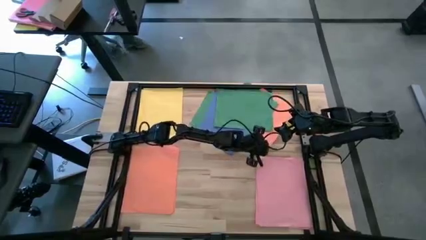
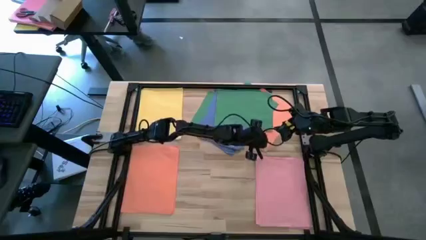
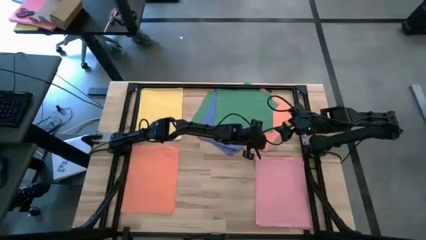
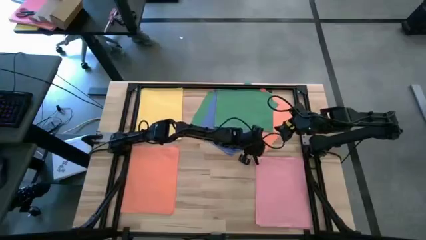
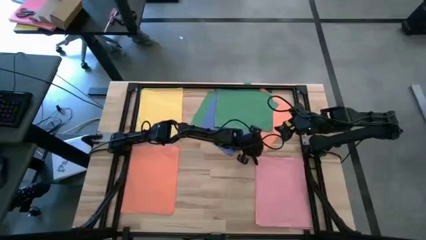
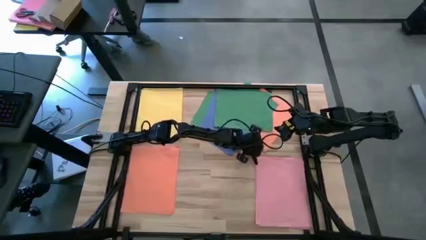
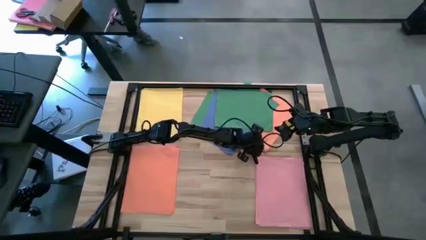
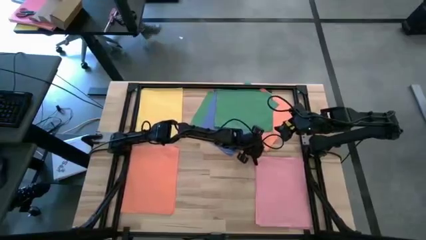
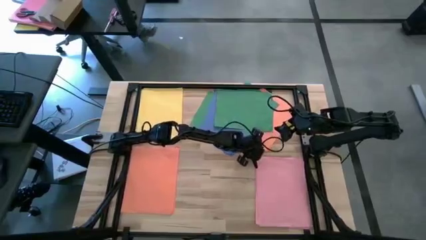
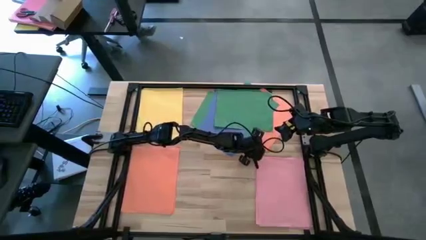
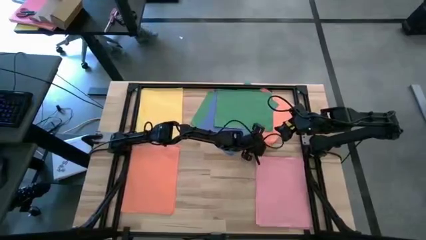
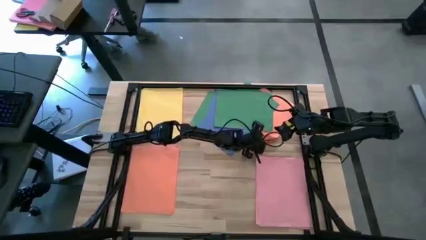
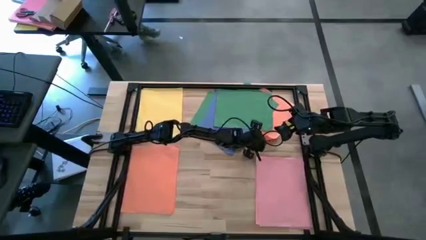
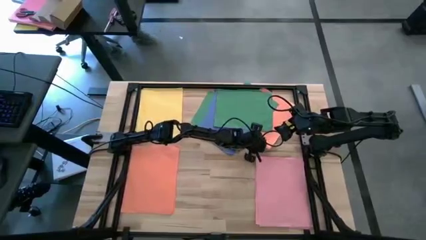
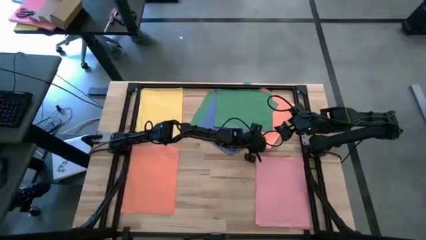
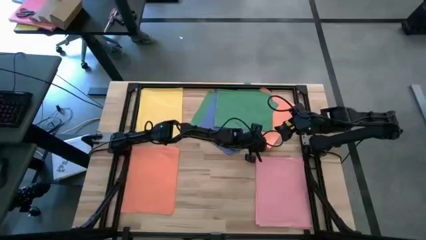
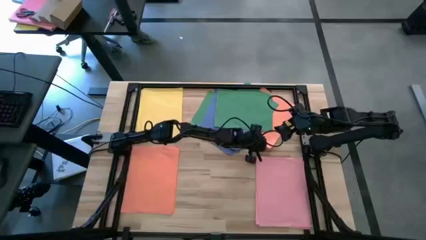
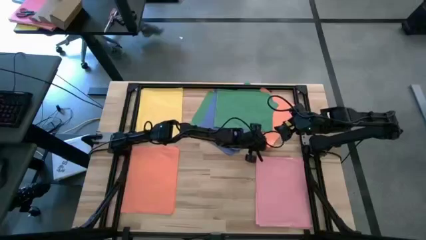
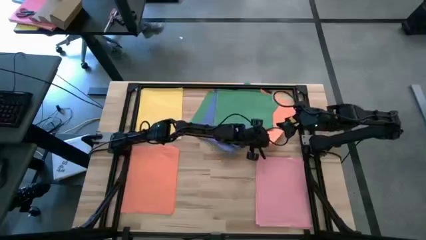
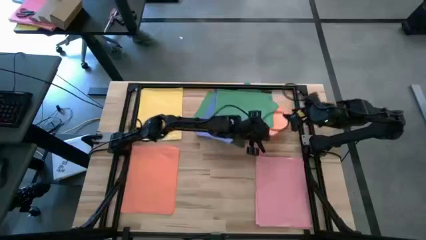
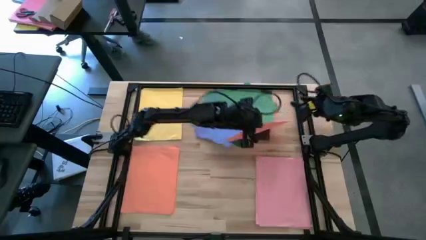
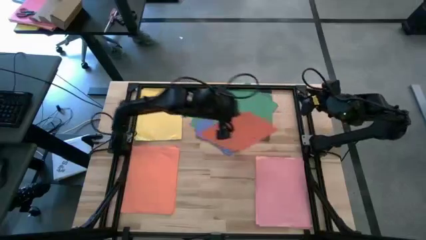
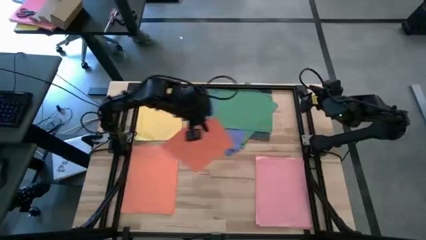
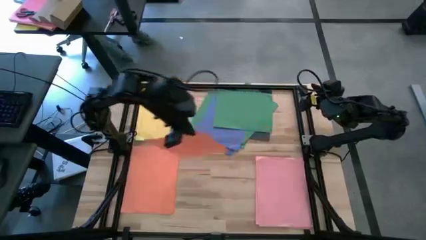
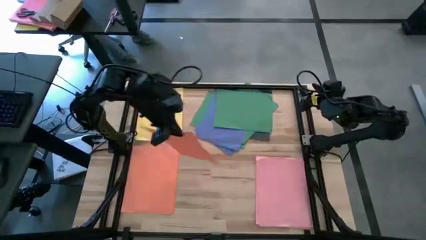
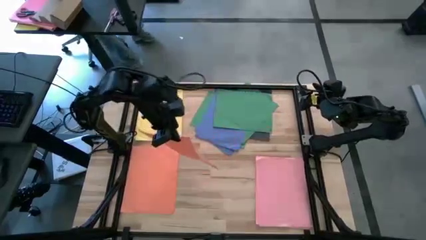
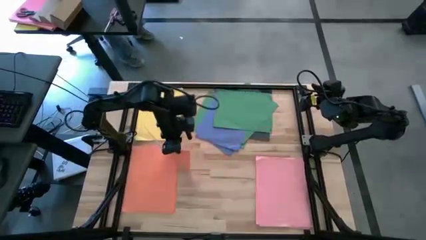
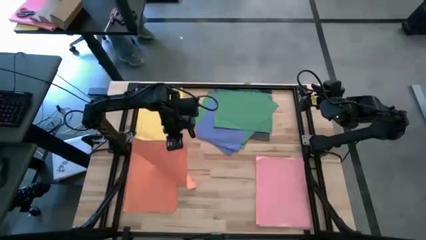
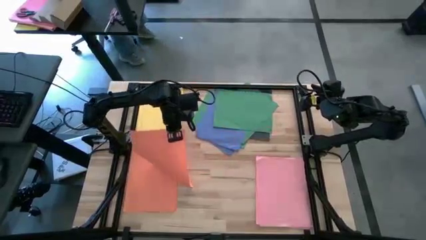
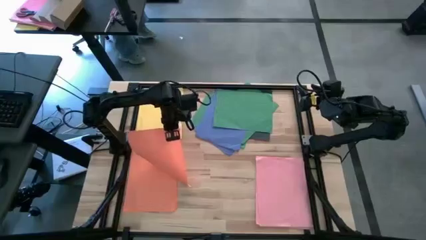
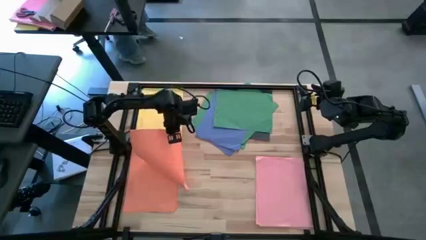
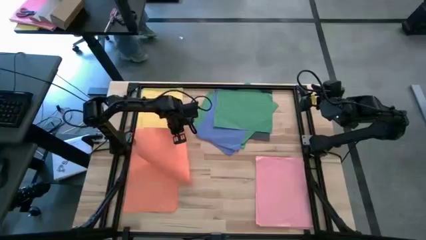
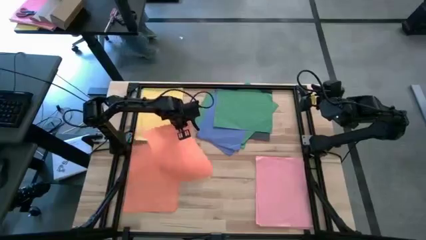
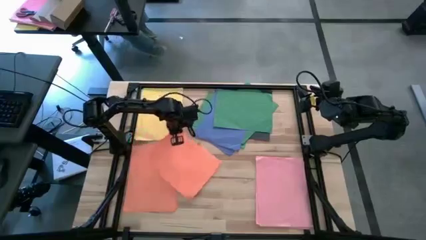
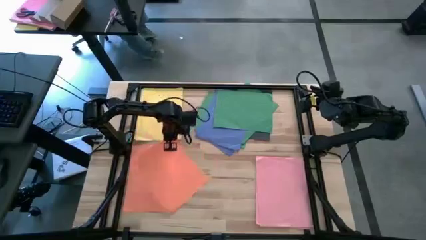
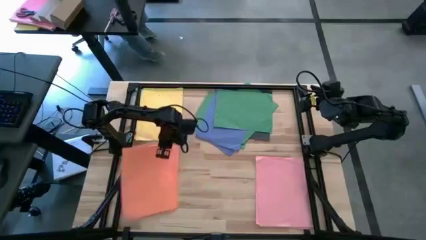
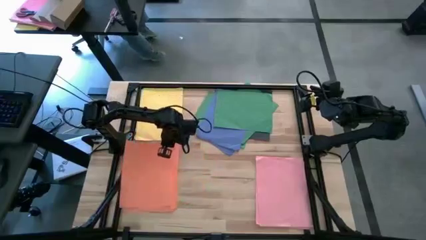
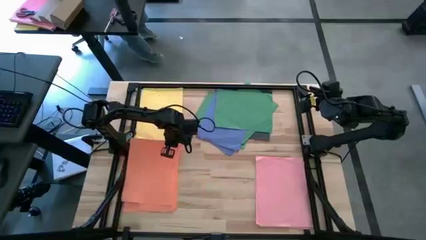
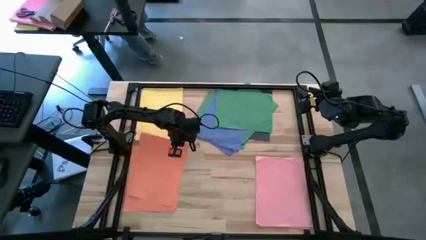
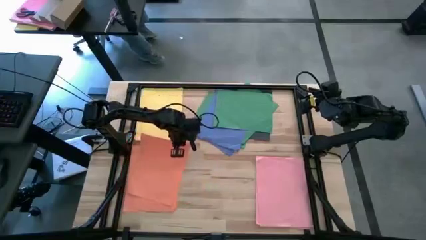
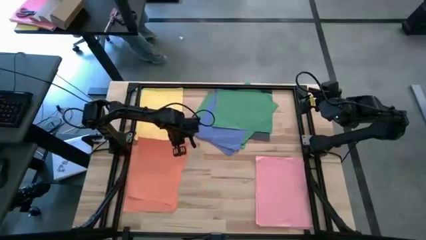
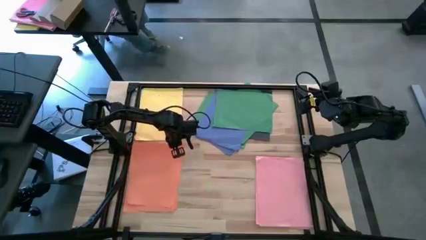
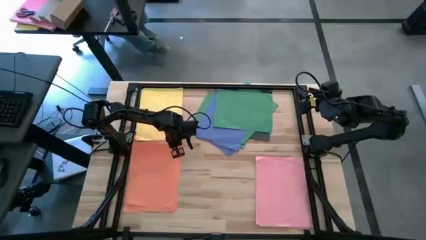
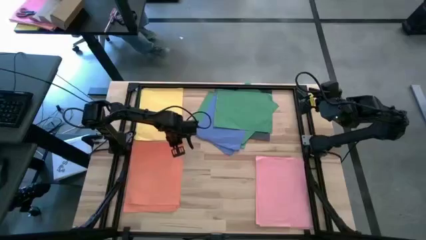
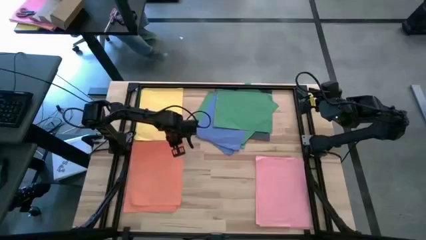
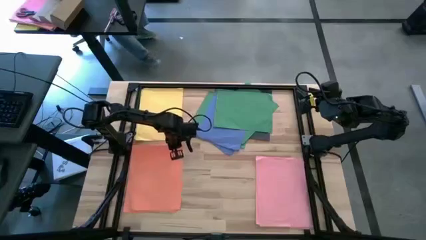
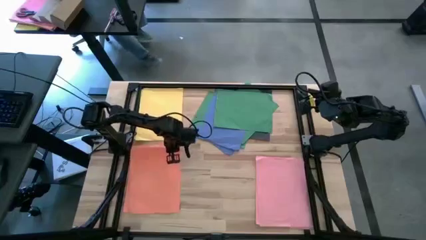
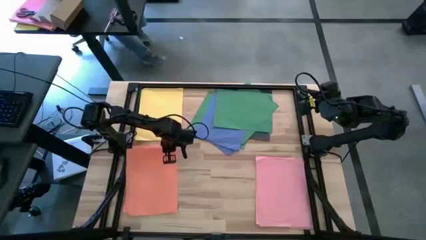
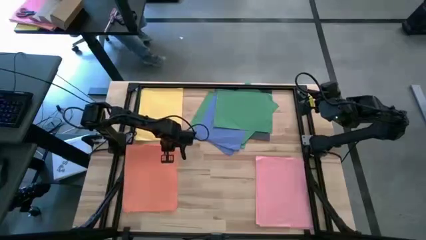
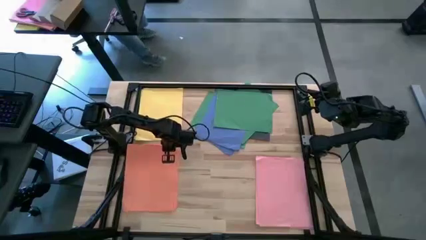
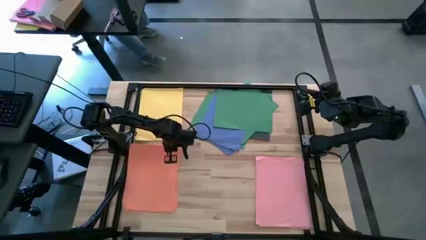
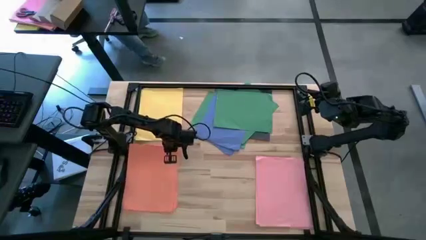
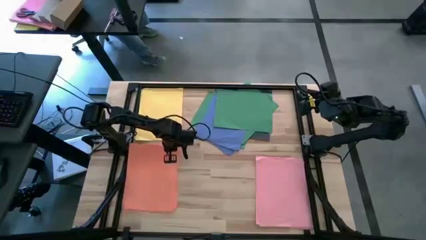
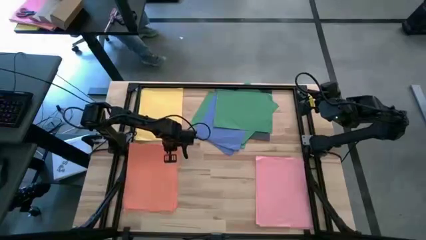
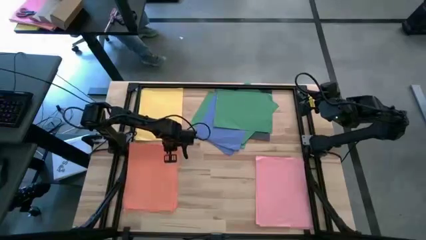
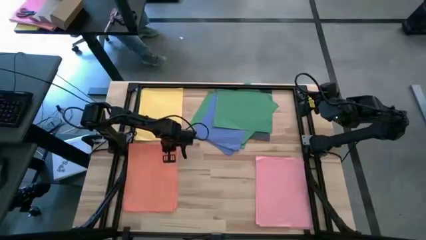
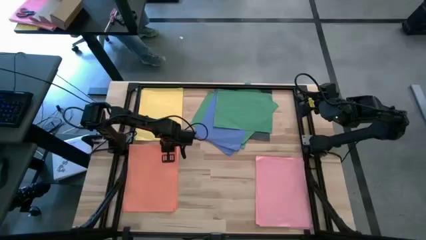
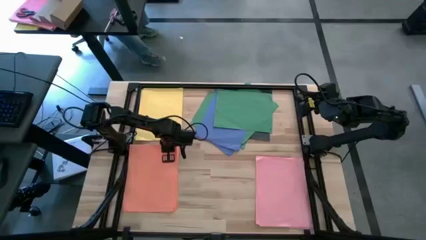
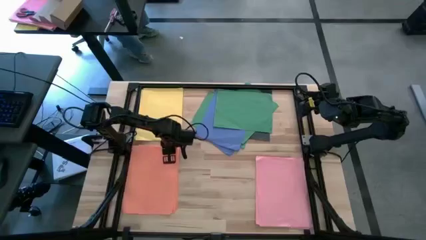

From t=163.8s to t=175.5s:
Task: Organize paper
Stack the orange paper on top of the stacked orange paper

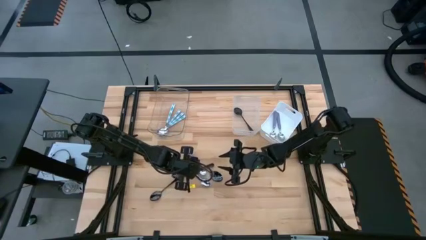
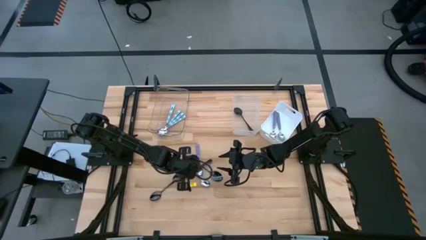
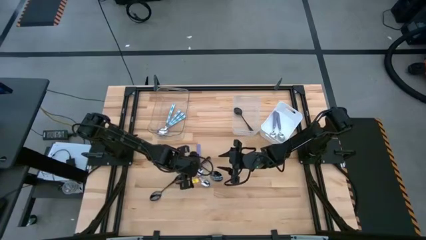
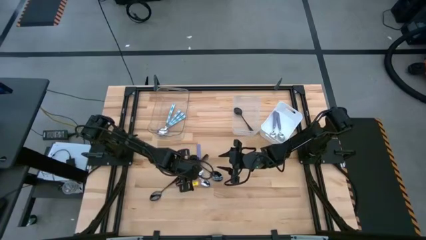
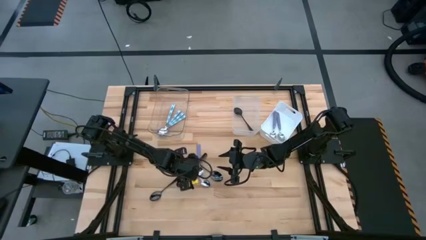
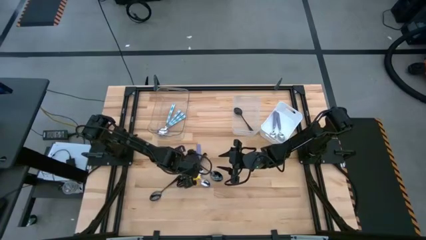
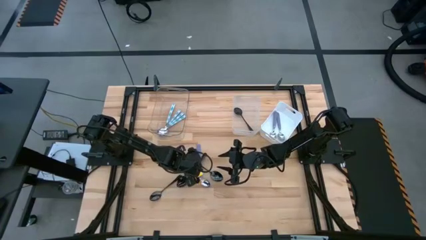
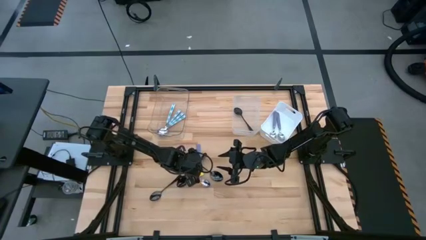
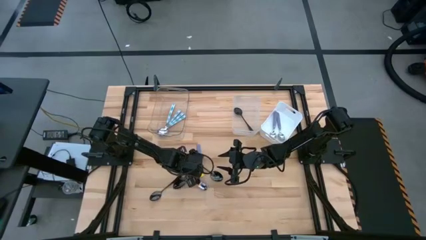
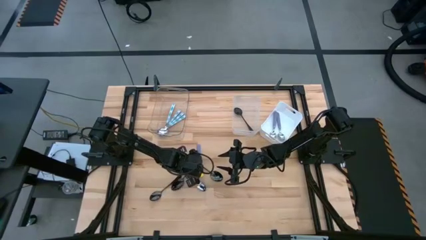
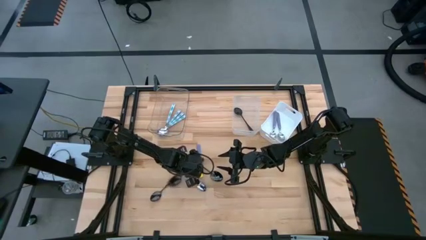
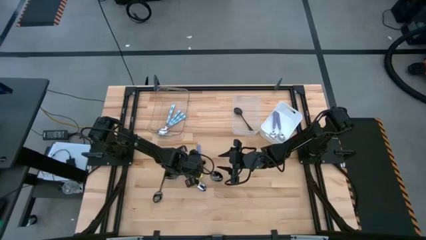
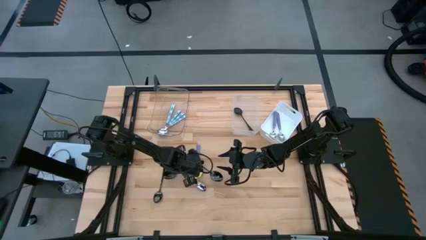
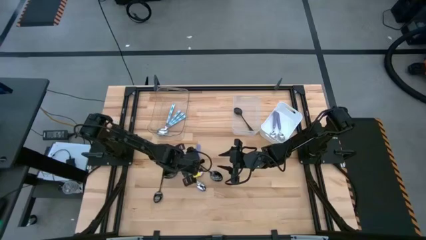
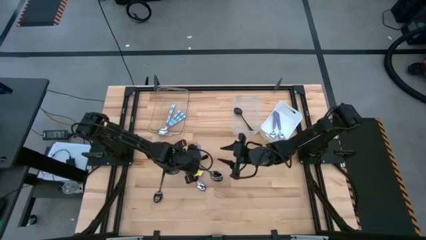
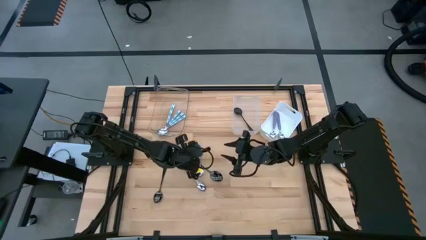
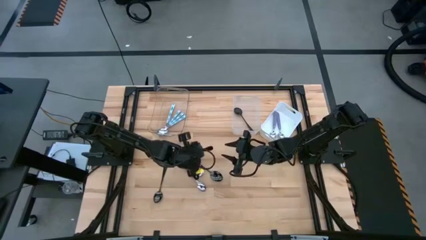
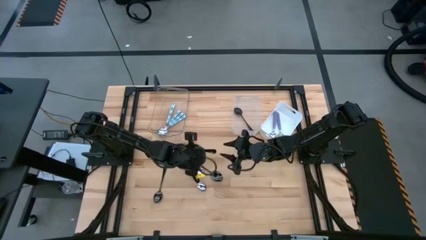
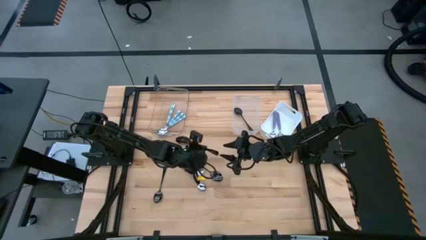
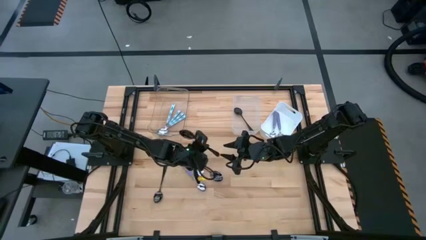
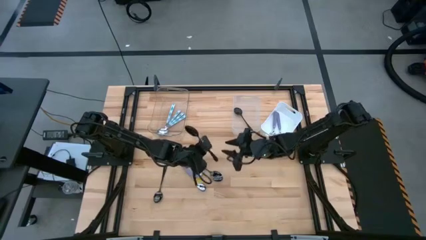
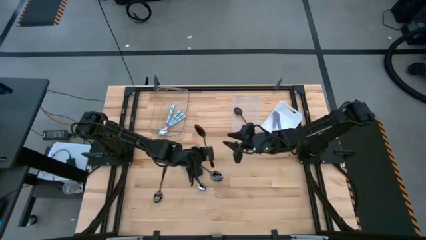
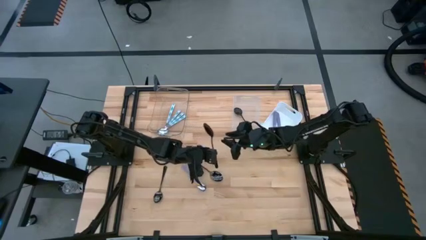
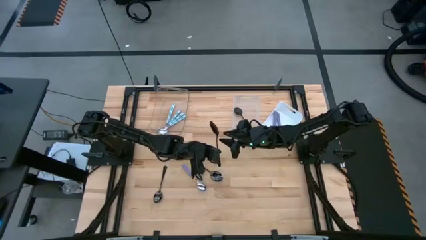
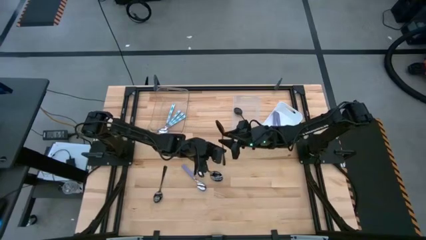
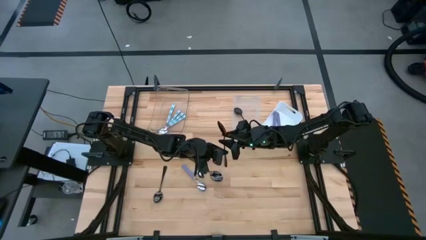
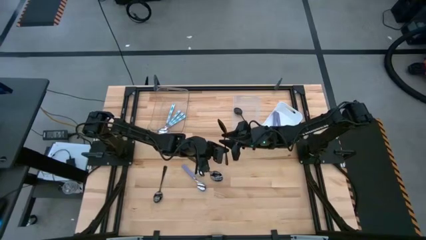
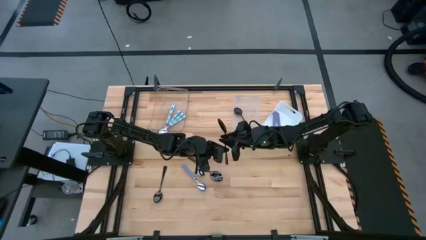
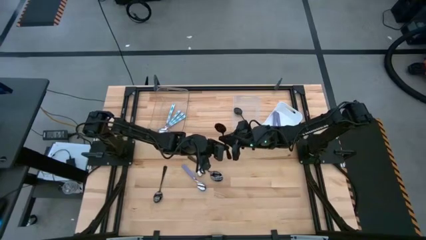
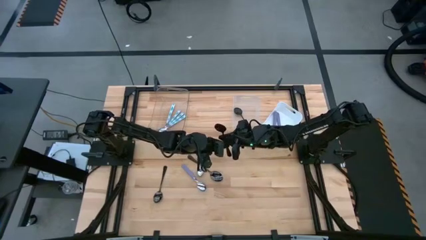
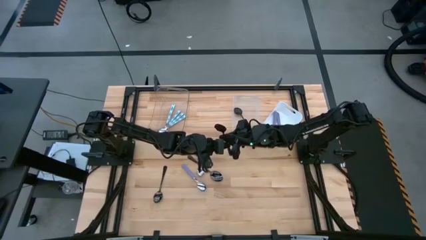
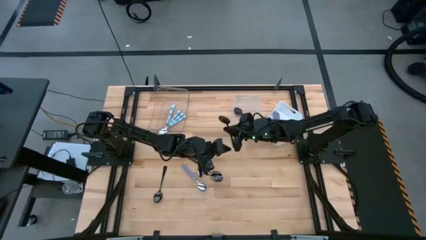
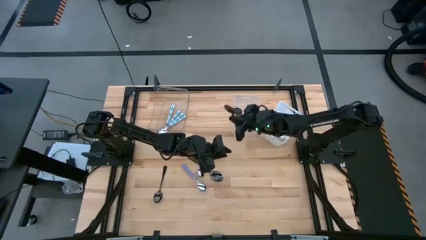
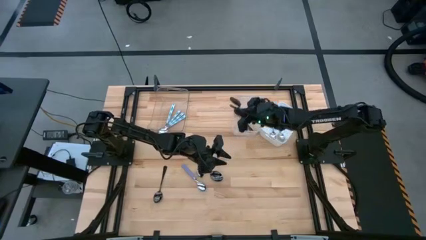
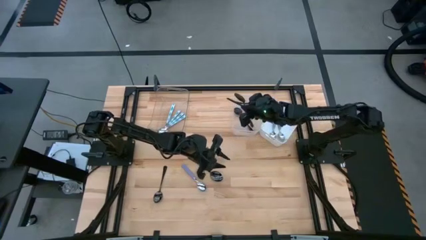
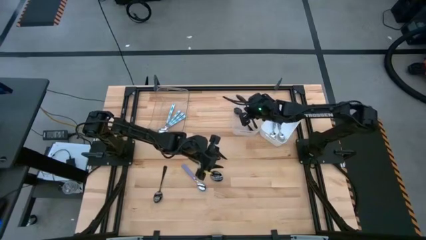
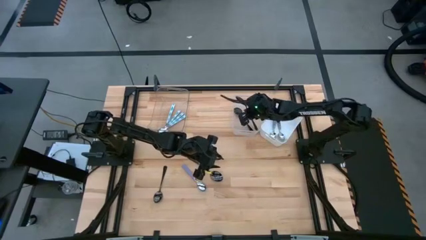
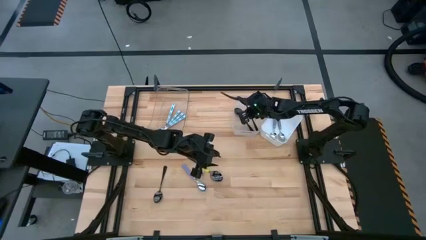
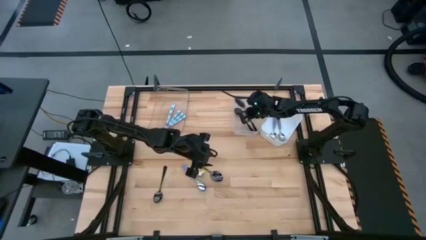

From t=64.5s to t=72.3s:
Task: Sort silverware by color (type)
Put the black spoon into the transparent white bin
